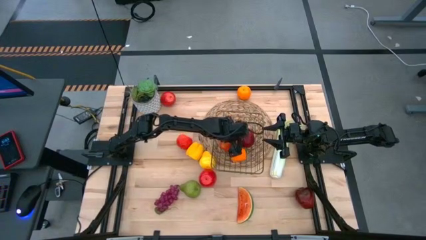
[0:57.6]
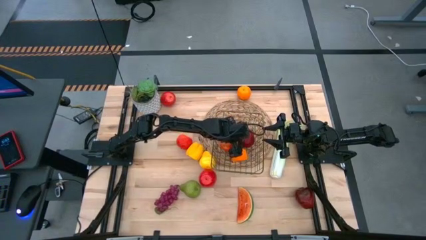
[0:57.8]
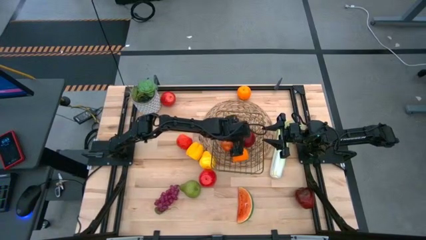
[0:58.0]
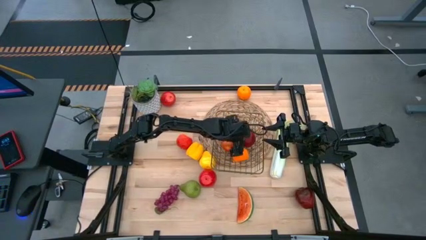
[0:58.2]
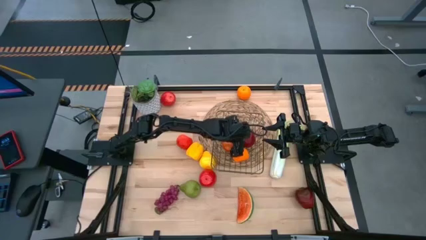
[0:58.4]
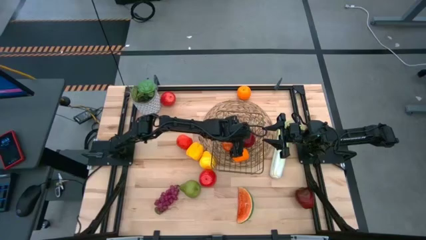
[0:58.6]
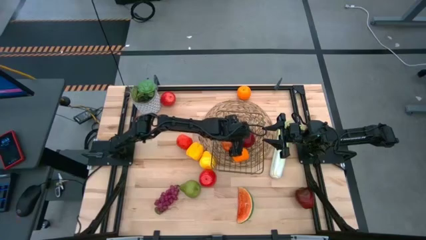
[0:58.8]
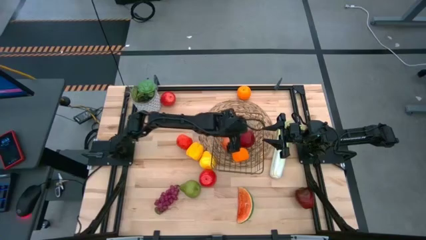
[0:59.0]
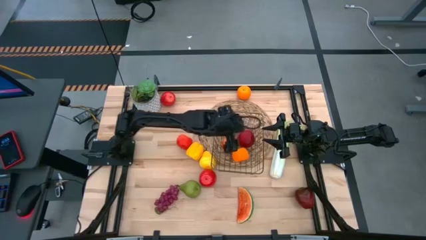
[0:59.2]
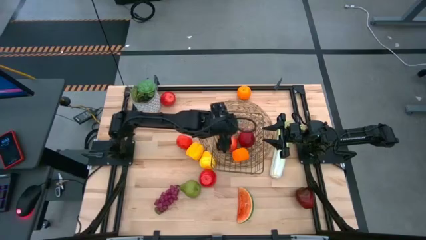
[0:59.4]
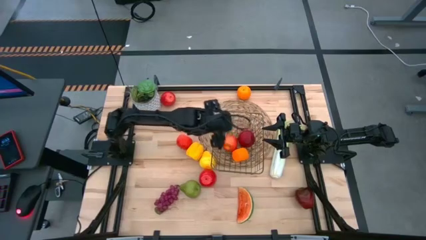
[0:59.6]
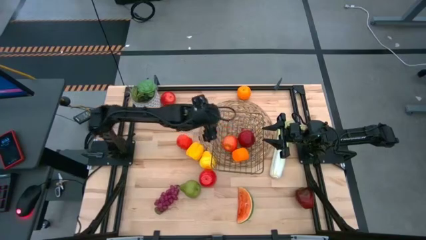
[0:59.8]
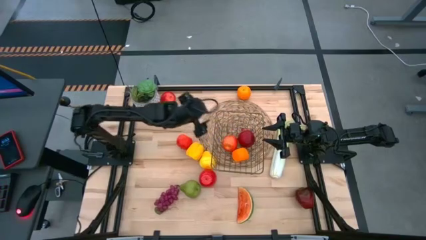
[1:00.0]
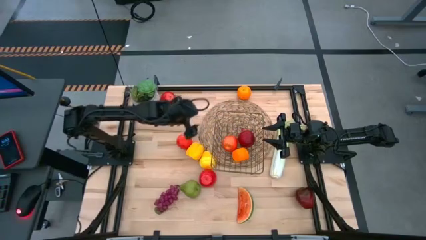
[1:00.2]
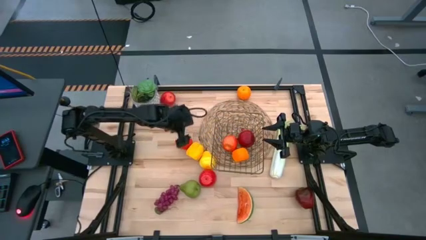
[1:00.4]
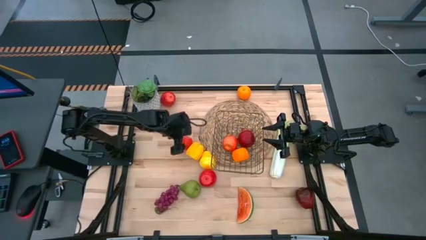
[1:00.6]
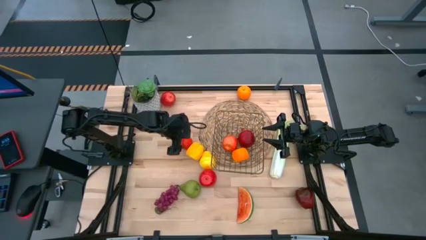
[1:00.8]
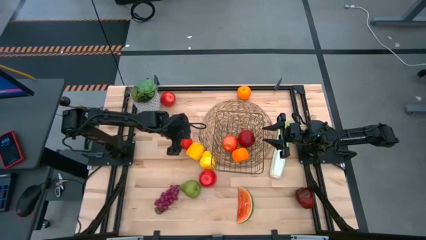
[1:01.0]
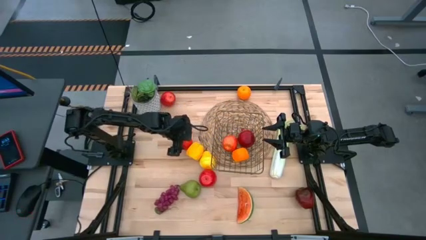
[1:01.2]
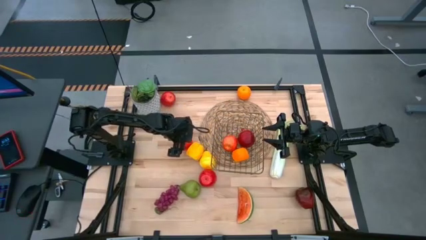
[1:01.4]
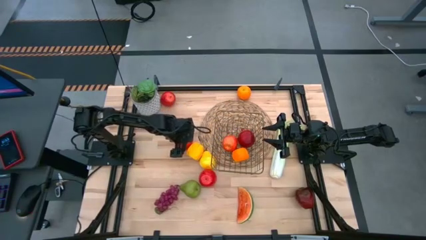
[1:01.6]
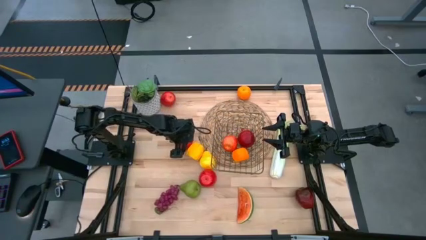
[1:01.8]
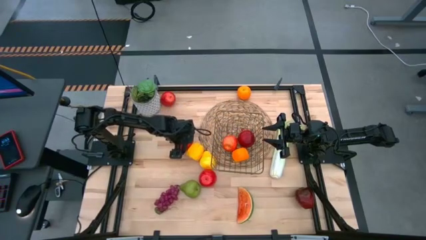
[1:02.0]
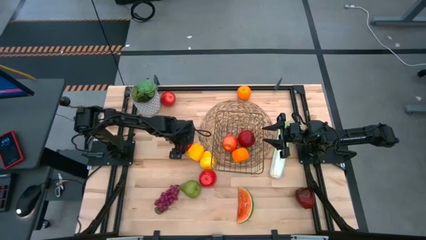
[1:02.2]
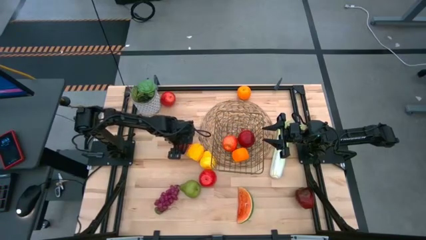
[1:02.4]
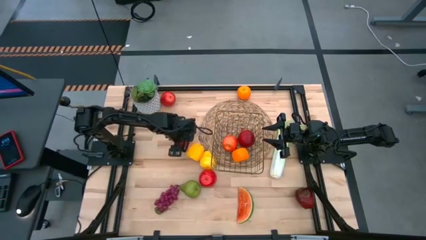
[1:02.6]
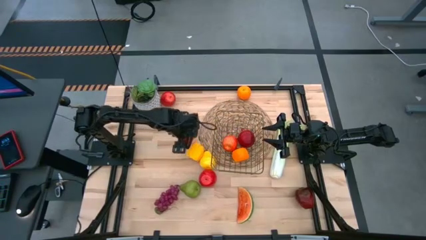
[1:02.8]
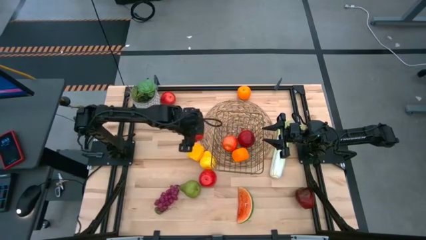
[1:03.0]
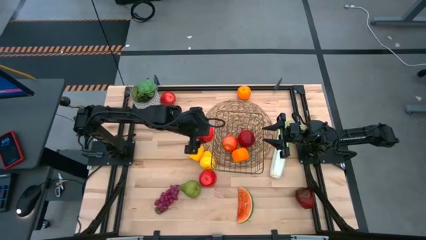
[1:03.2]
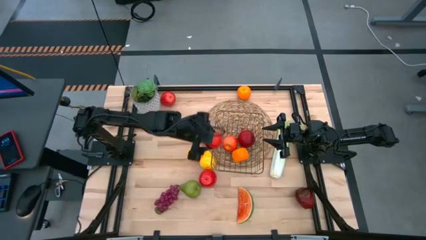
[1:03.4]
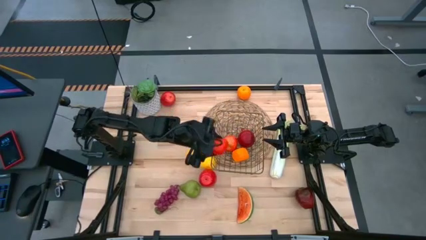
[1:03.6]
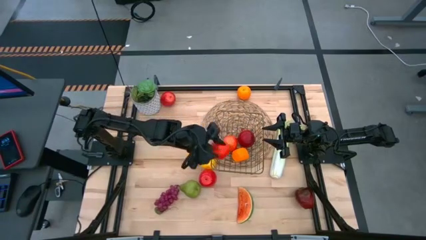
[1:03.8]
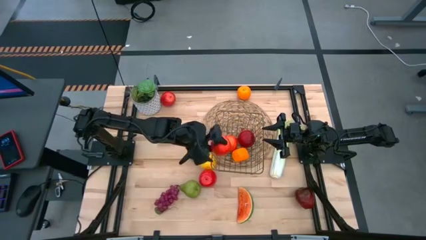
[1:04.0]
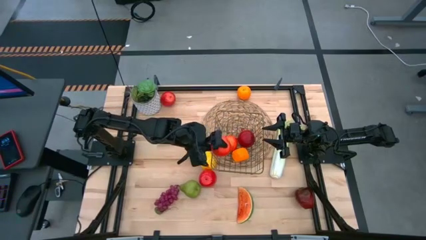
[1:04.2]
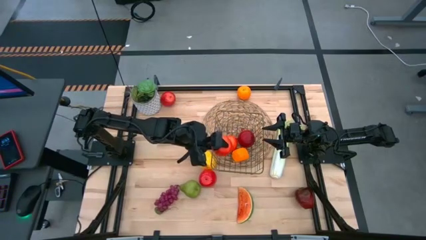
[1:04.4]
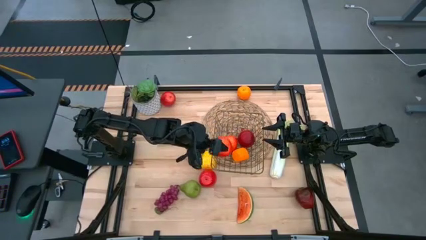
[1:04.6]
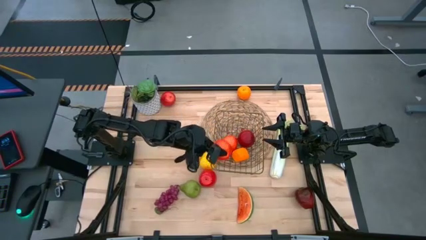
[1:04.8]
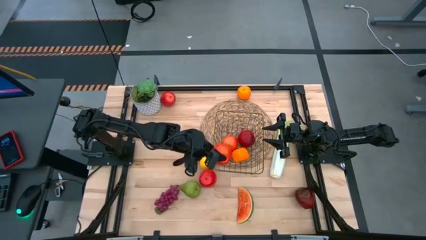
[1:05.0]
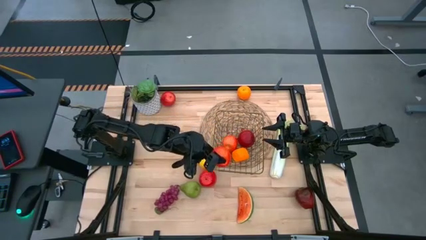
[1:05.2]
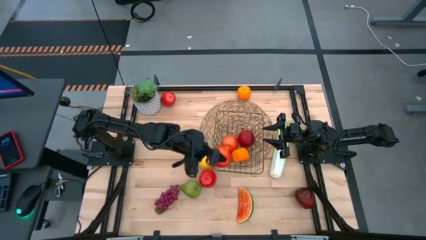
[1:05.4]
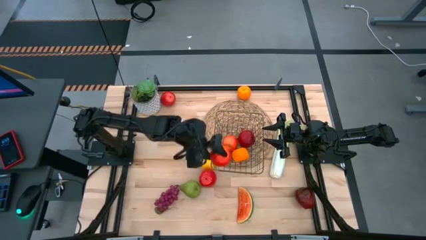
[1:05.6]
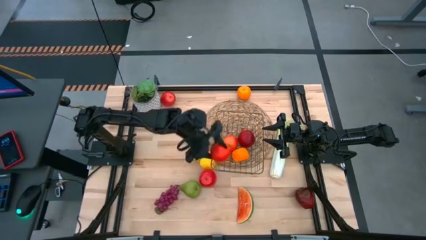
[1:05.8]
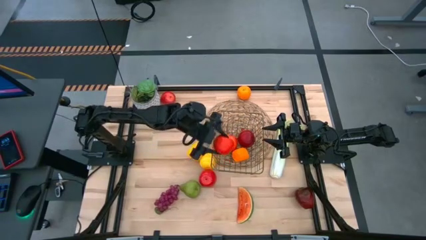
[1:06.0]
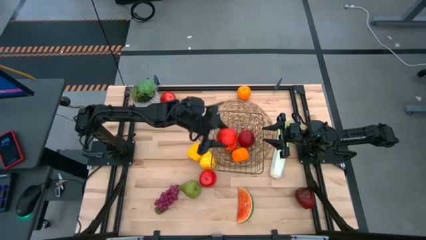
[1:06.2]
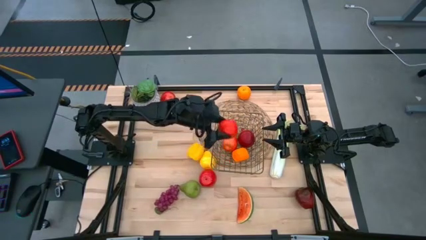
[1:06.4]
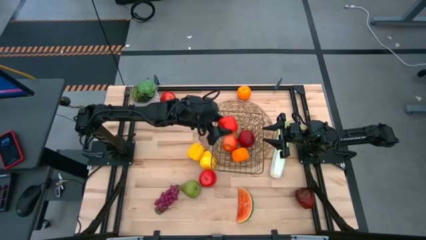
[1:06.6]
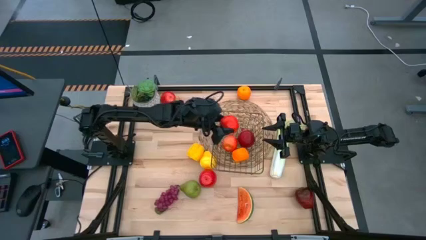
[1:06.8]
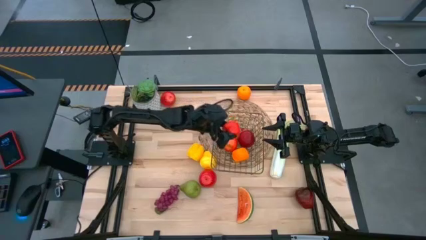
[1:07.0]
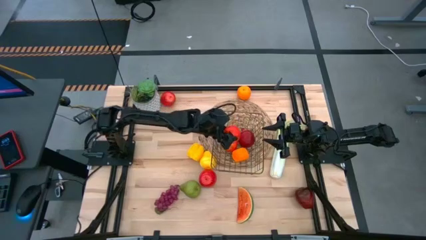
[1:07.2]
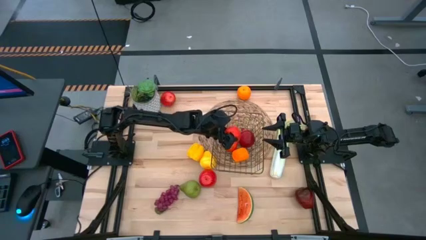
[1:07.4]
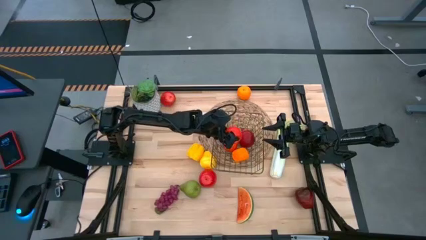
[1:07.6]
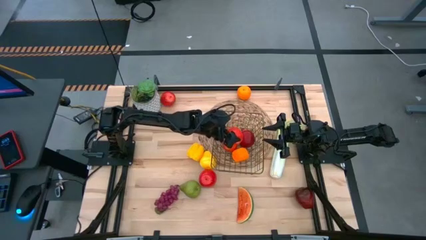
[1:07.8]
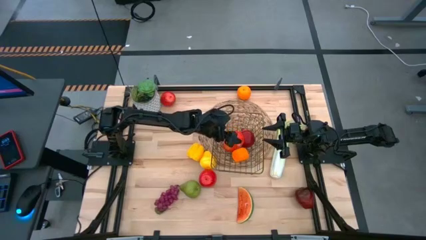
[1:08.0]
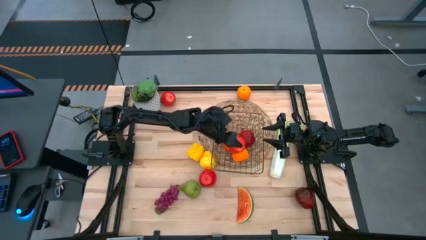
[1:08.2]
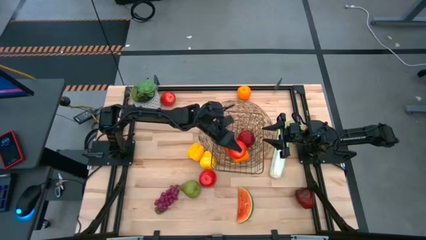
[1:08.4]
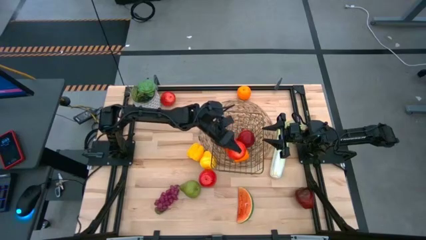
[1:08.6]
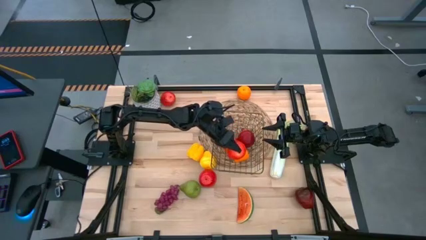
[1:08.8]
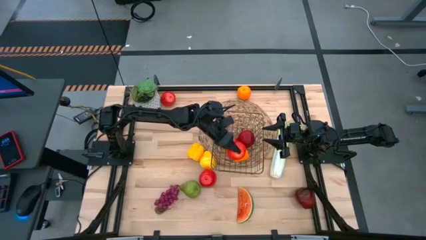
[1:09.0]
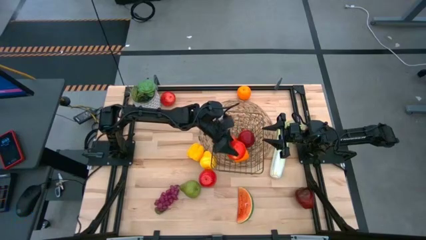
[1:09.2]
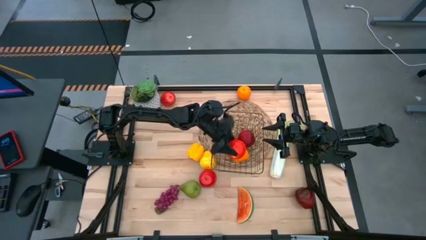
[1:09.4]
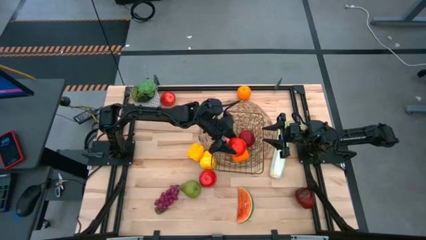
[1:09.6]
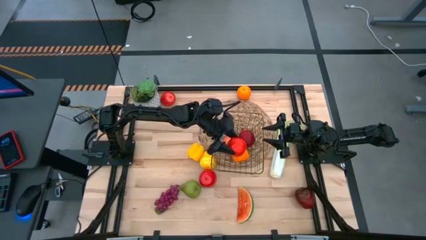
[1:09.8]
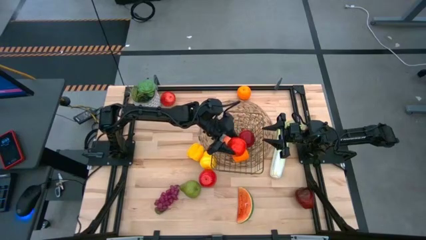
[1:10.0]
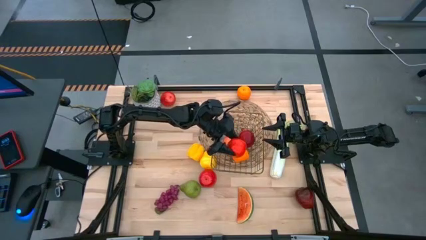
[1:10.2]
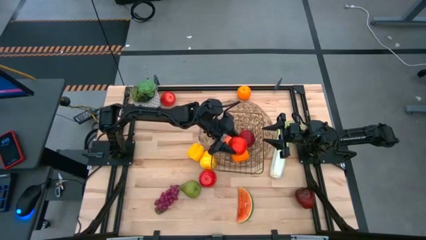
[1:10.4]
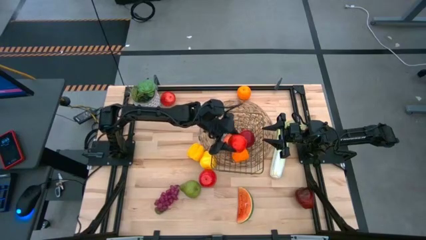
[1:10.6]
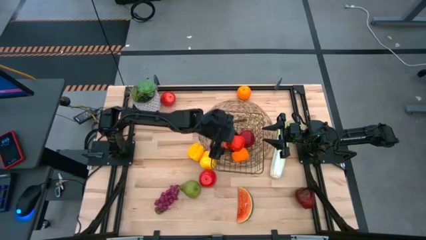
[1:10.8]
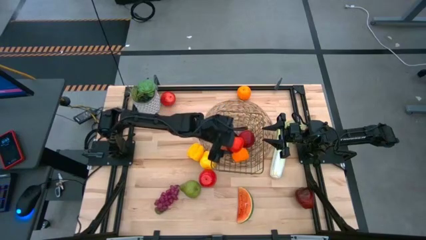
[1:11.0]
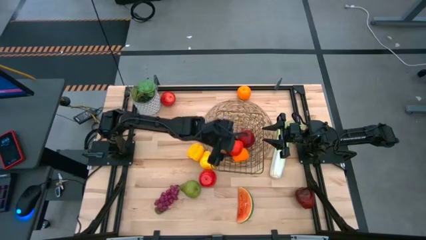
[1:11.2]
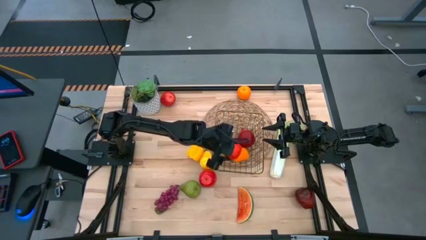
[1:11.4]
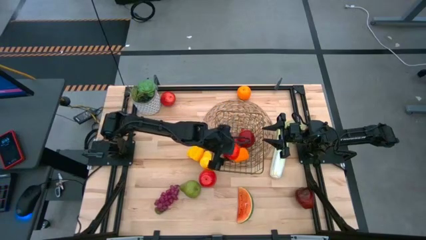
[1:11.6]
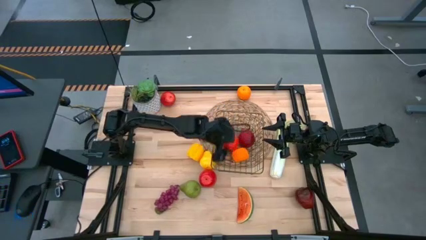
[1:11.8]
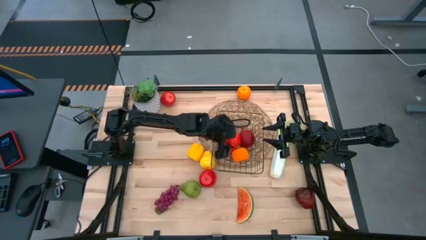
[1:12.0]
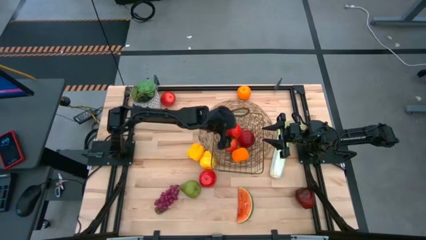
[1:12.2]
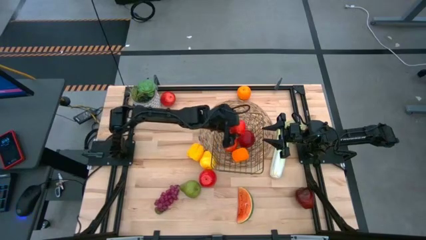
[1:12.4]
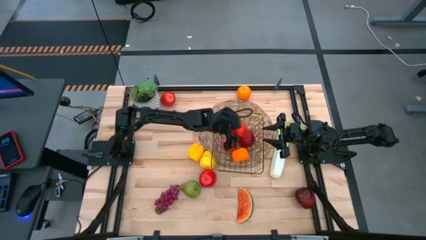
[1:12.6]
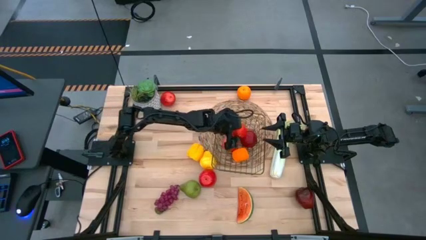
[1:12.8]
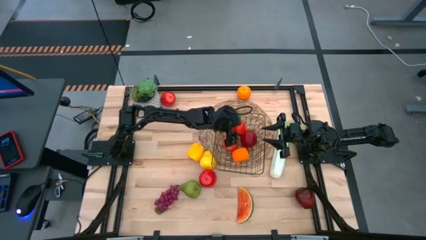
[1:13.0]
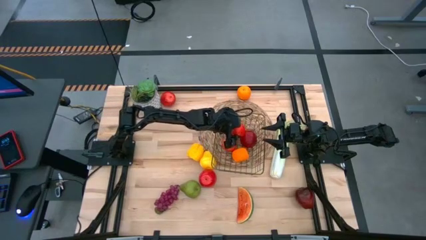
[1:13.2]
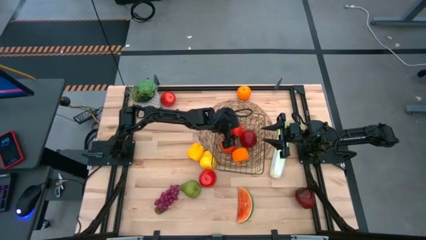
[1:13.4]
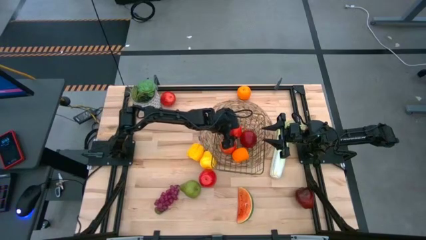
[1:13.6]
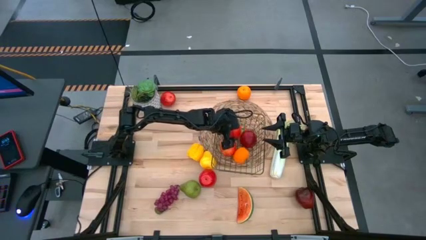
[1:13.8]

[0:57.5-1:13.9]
Task: Build produce basket
Put the middle red apple into the wire basket
